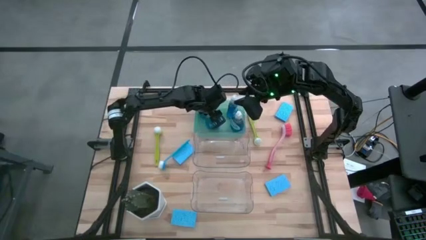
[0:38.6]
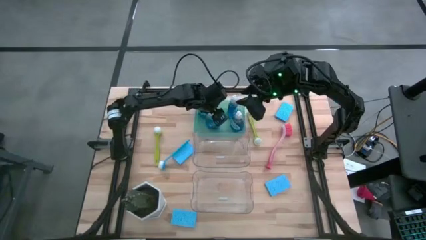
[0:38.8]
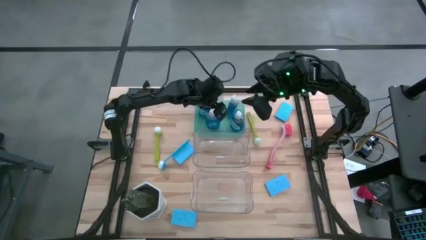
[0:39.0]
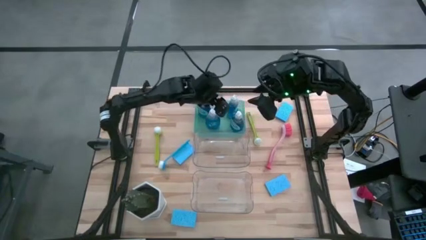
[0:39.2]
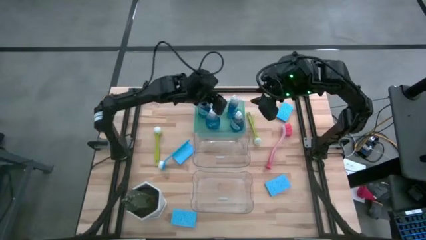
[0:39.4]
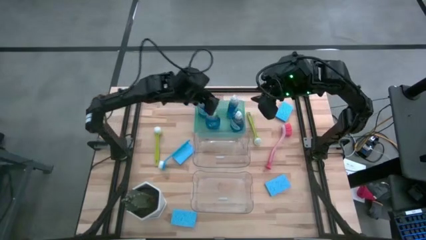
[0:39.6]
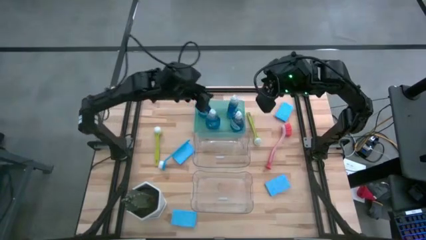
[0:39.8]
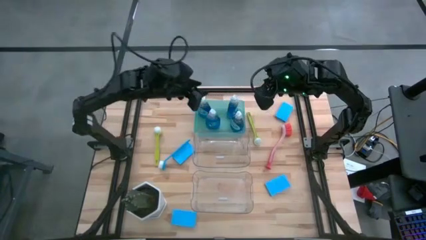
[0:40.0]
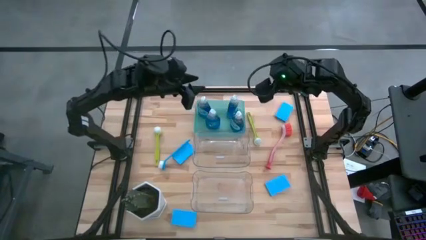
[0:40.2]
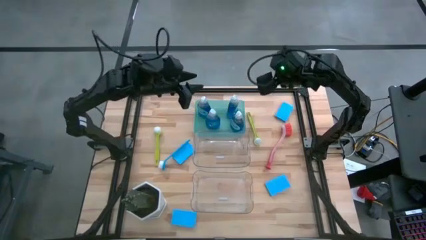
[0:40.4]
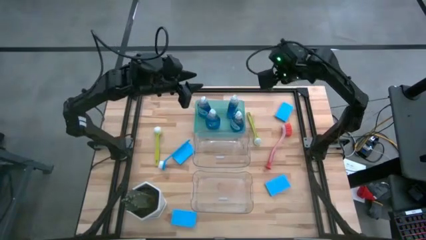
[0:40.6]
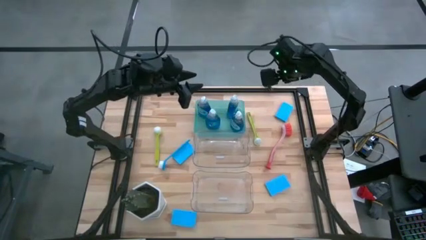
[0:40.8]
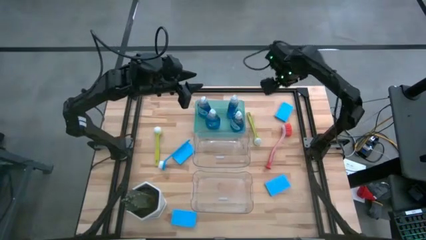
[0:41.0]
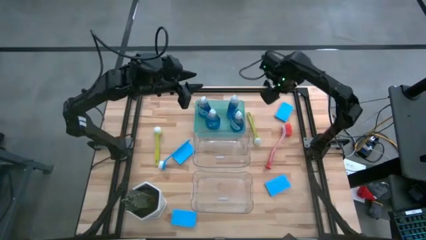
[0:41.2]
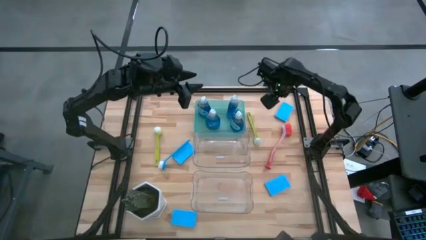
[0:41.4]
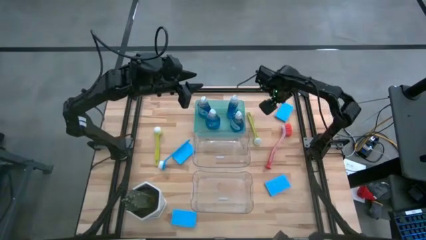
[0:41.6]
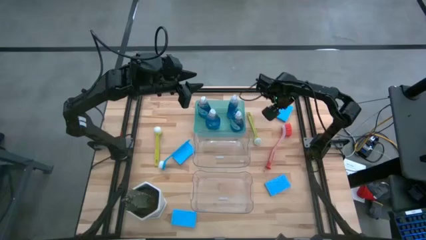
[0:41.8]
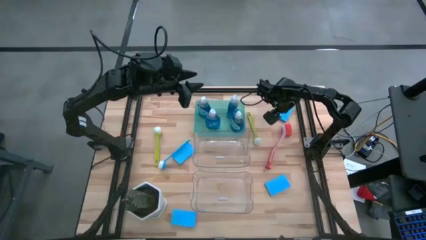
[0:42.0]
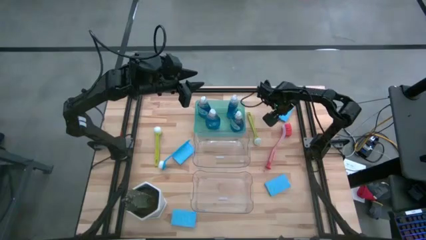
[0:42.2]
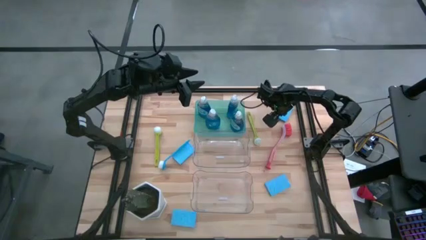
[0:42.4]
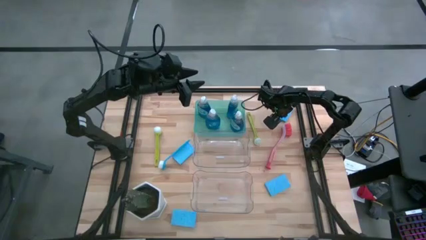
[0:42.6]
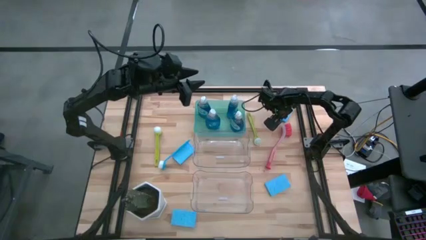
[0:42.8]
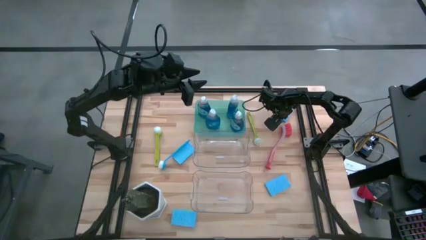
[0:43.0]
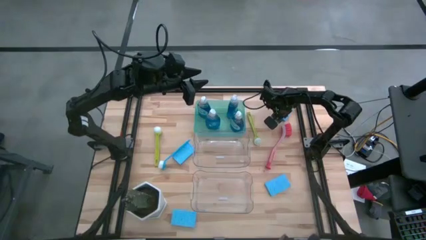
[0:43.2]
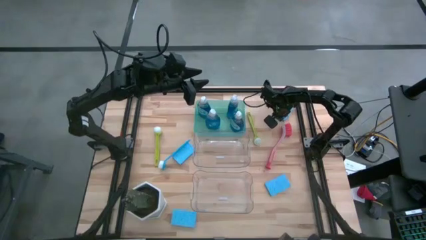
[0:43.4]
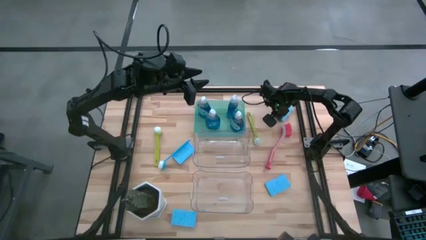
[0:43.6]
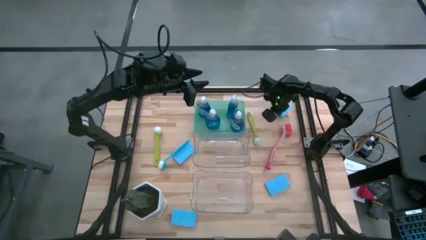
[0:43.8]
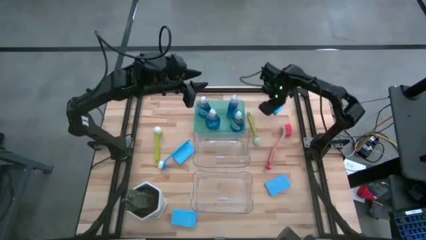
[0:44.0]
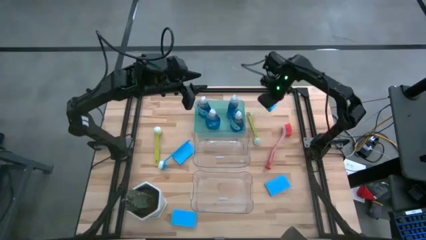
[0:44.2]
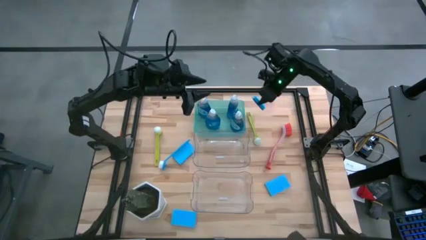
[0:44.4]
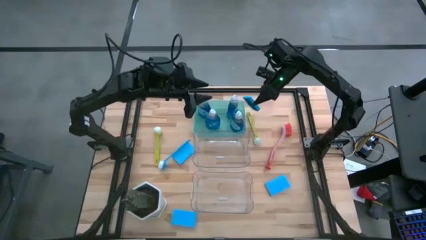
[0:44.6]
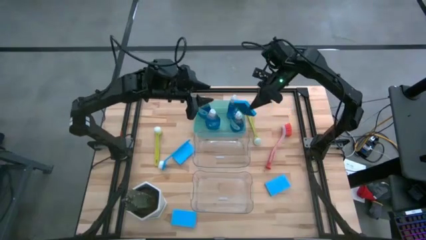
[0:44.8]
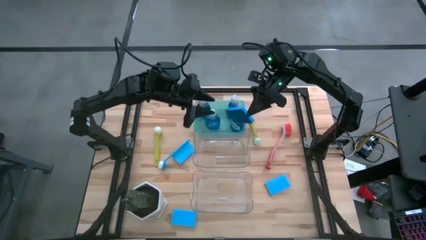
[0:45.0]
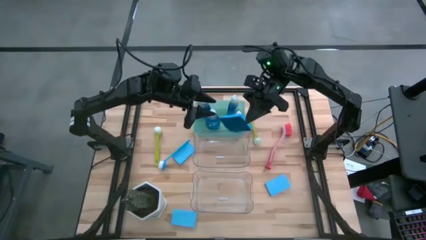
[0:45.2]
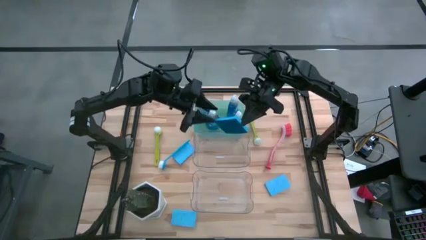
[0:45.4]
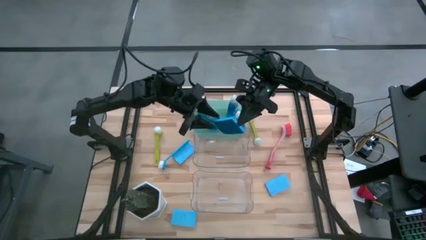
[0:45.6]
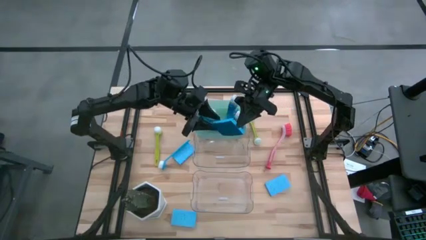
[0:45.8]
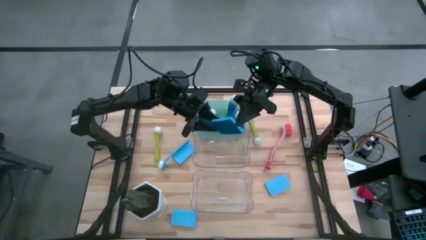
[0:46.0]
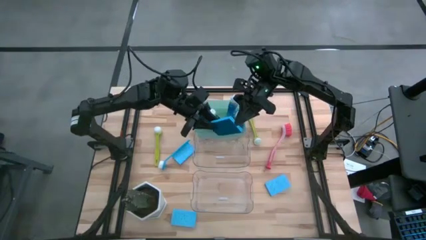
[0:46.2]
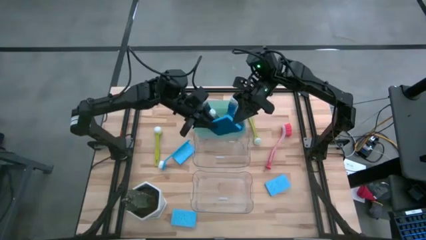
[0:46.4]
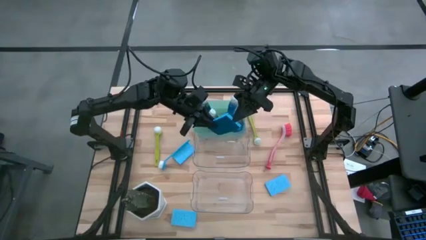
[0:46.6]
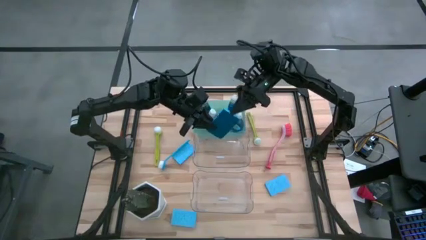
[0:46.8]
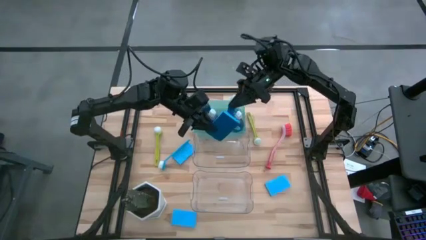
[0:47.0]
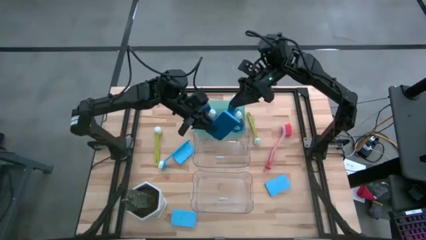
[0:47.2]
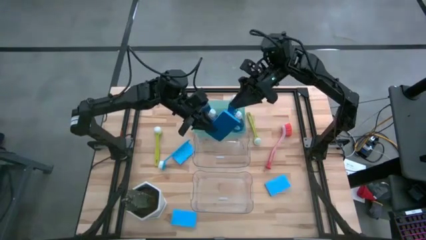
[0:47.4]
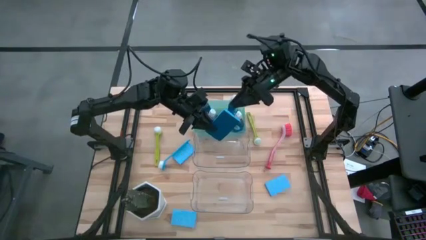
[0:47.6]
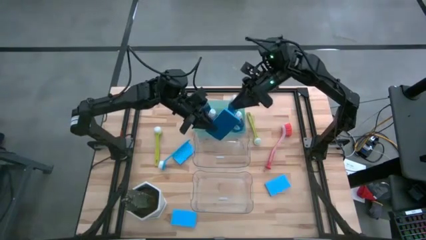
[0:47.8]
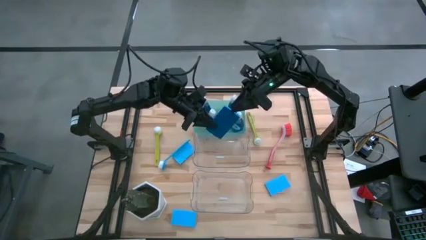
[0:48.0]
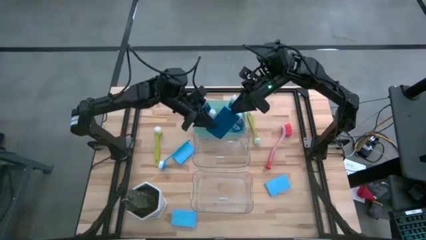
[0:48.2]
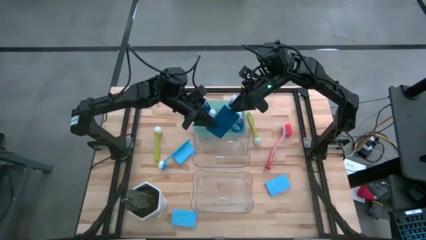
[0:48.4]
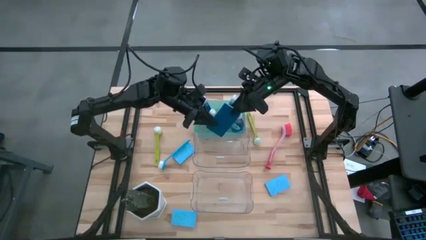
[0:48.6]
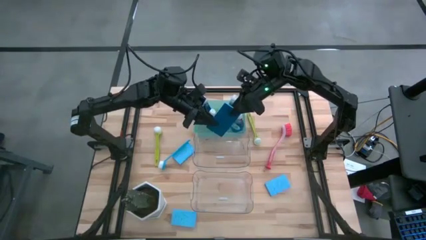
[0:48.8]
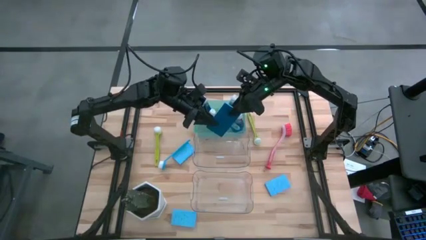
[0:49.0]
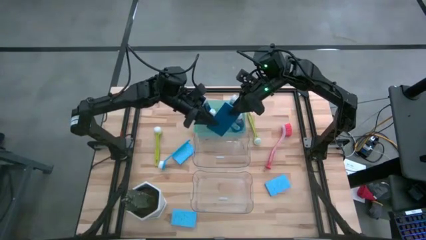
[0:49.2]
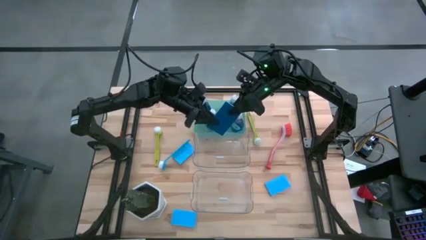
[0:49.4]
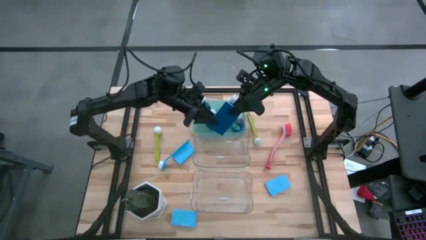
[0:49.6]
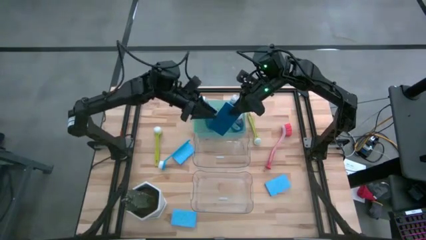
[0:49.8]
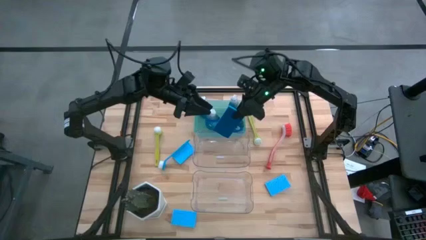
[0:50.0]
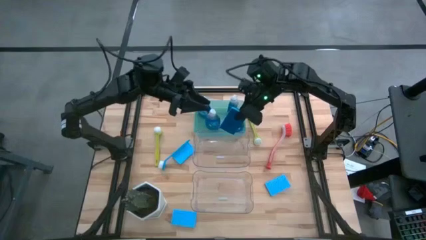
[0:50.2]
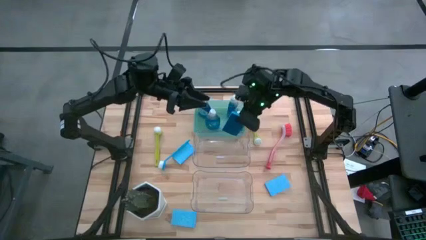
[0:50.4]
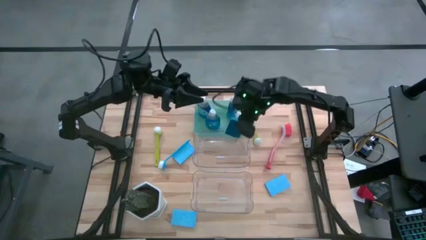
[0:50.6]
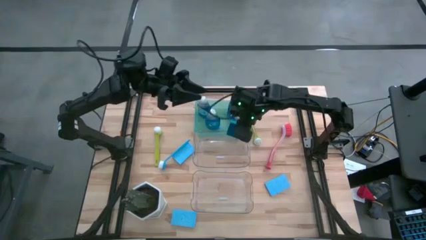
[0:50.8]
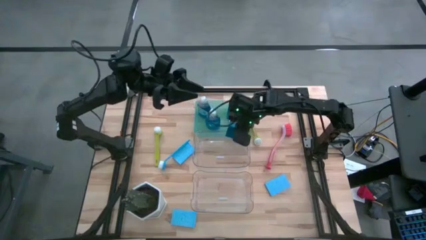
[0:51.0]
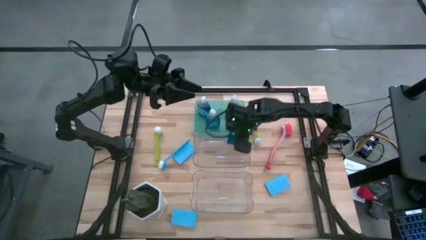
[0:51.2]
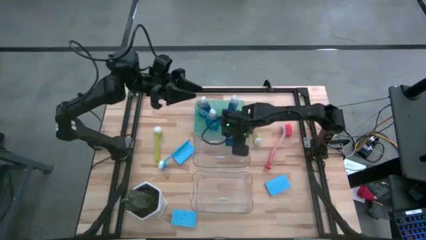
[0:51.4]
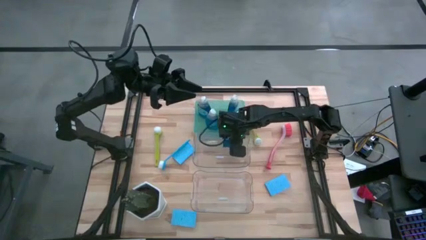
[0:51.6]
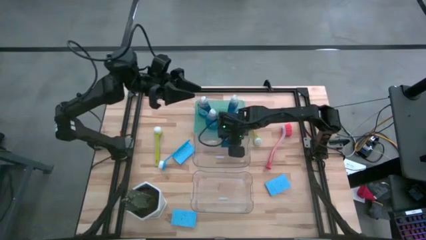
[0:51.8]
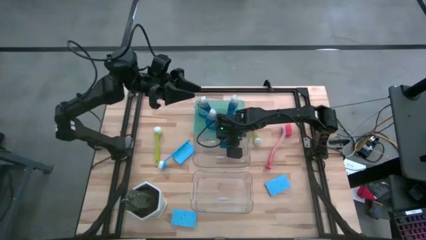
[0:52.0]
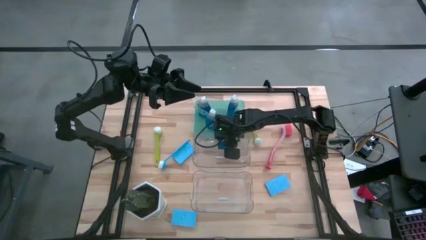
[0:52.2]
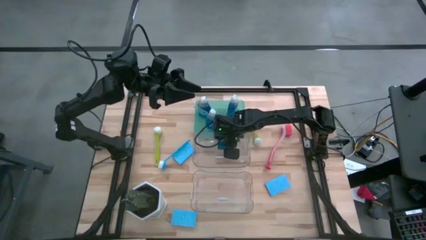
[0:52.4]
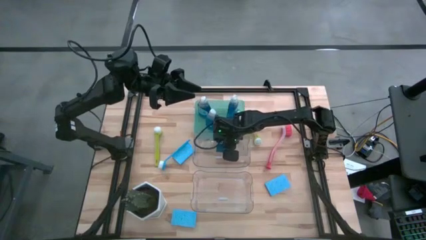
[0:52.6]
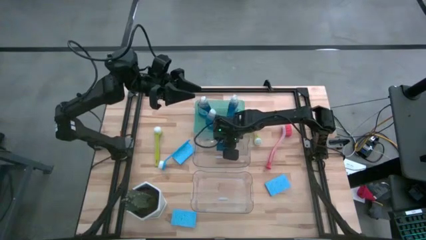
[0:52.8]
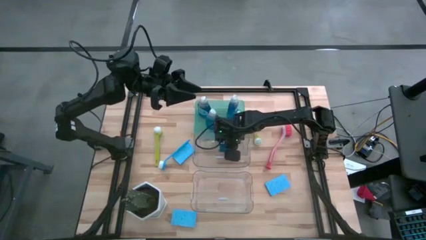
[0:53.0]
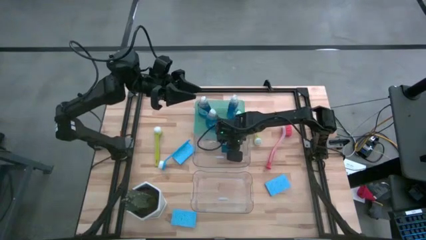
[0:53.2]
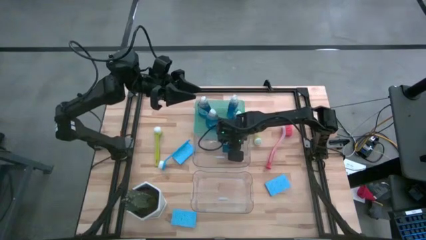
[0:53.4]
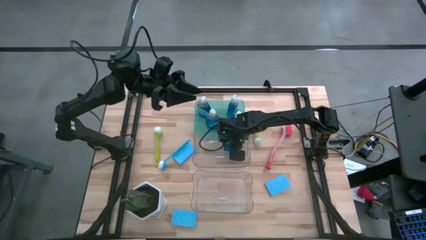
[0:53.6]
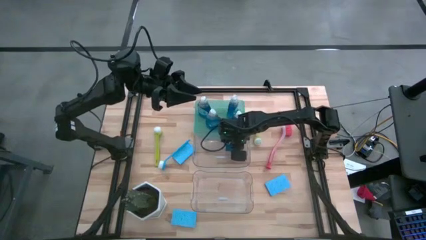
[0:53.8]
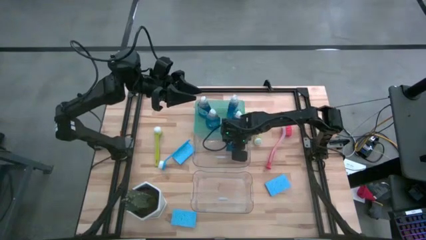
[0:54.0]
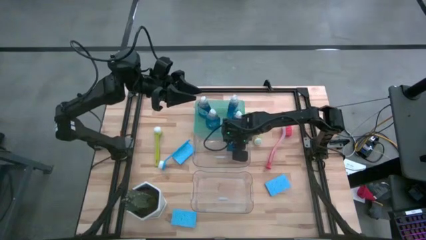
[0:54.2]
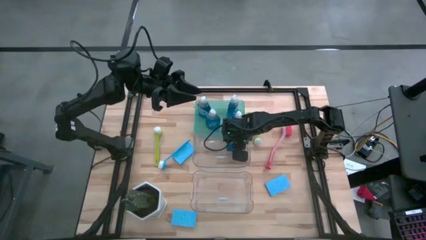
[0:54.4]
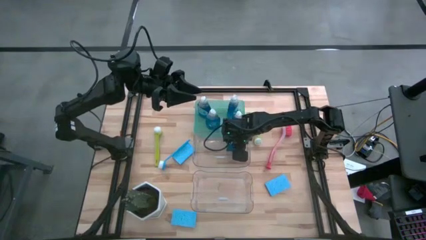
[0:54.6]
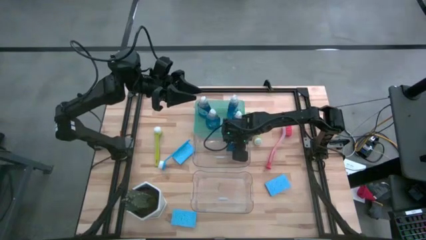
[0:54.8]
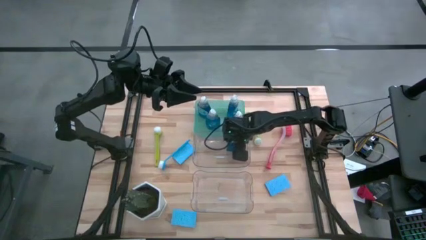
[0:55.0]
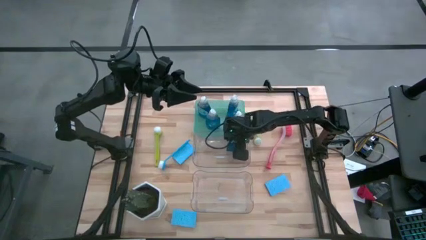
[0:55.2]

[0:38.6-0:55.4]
Task: Pick & Place Kitchen Sink Supplies
Put the top blue sponge into the top transparent bin
